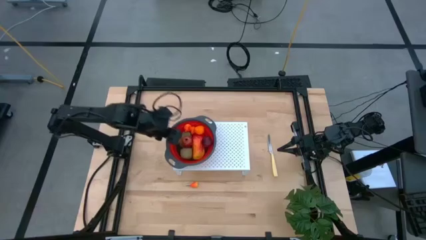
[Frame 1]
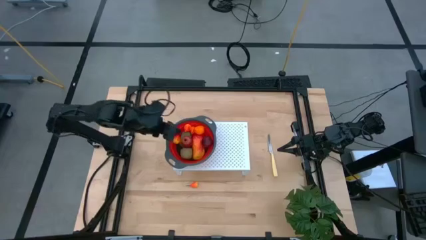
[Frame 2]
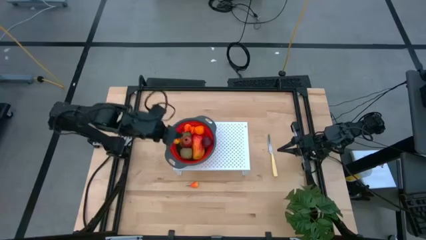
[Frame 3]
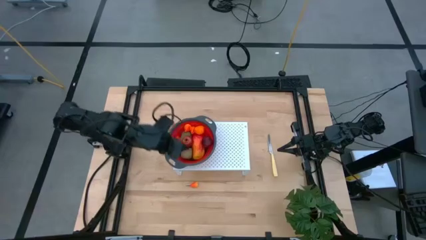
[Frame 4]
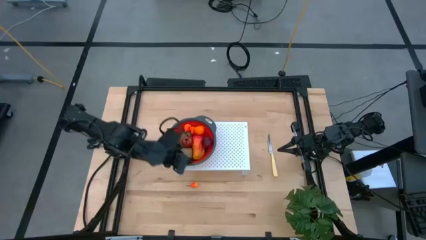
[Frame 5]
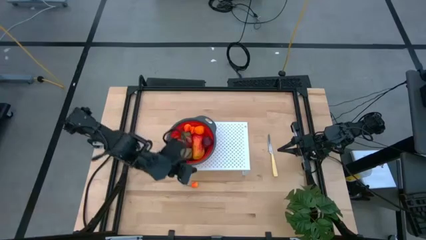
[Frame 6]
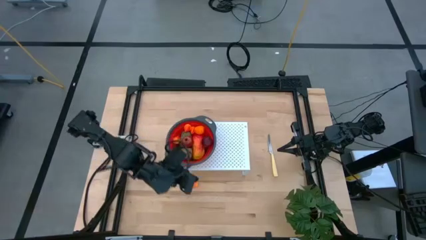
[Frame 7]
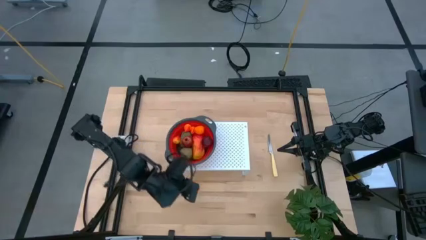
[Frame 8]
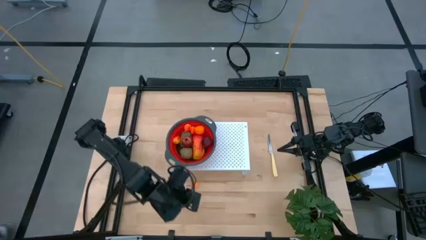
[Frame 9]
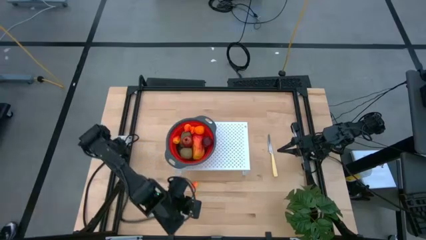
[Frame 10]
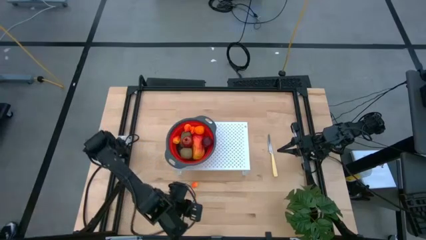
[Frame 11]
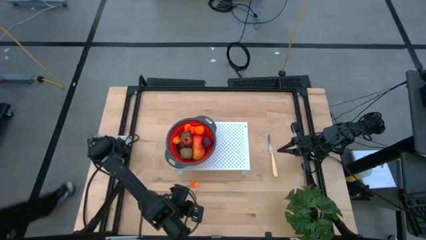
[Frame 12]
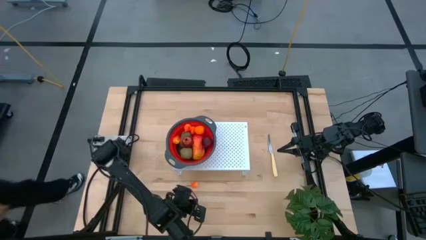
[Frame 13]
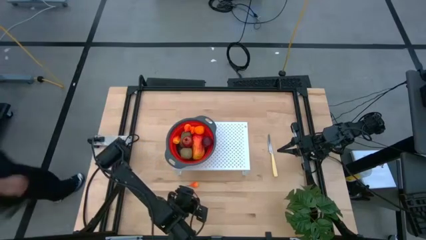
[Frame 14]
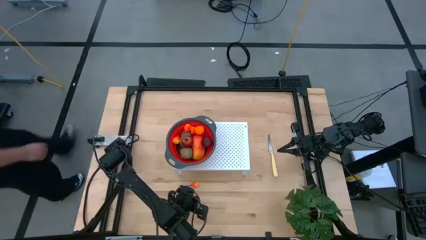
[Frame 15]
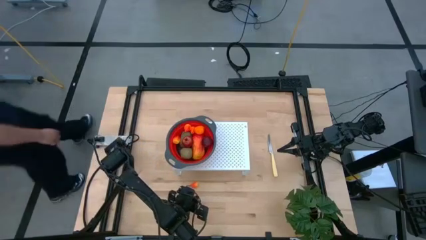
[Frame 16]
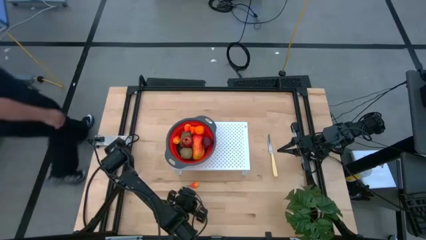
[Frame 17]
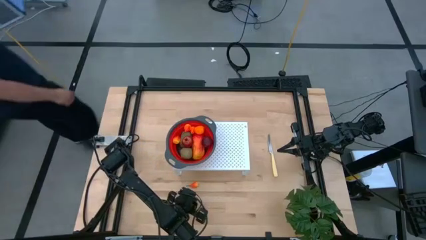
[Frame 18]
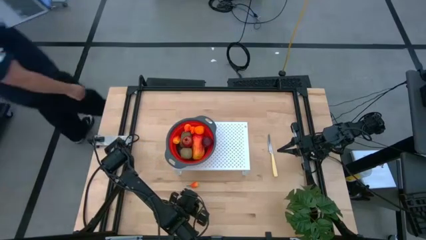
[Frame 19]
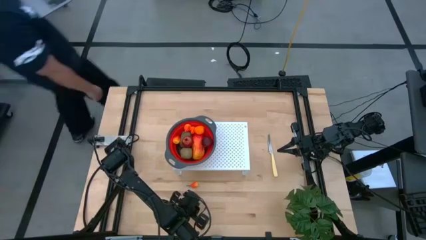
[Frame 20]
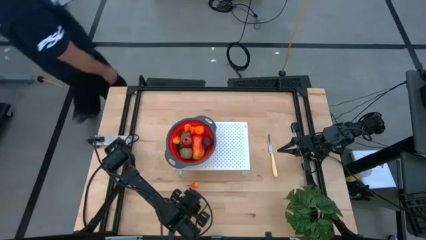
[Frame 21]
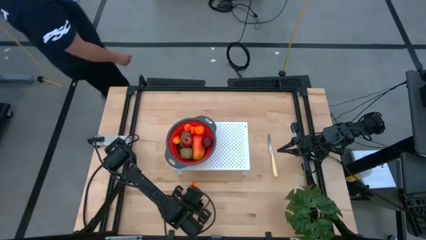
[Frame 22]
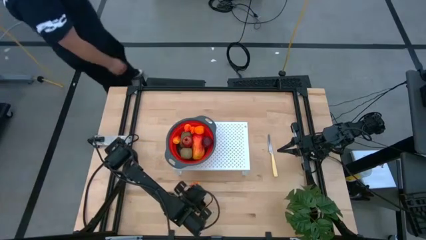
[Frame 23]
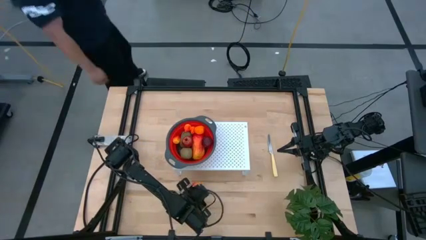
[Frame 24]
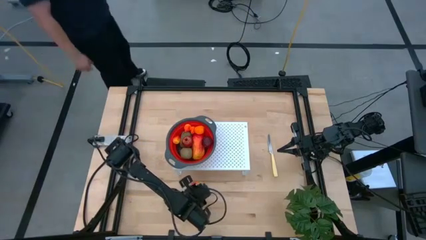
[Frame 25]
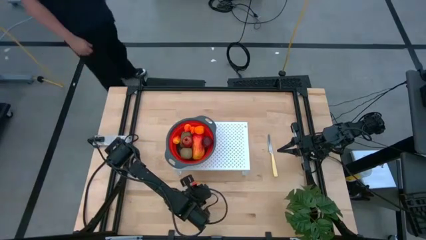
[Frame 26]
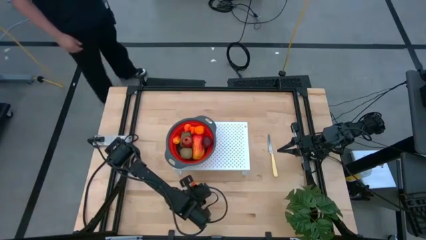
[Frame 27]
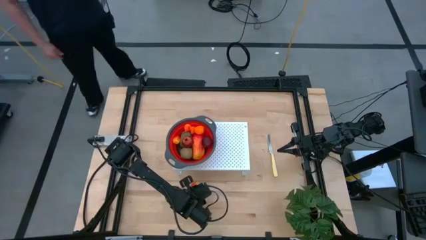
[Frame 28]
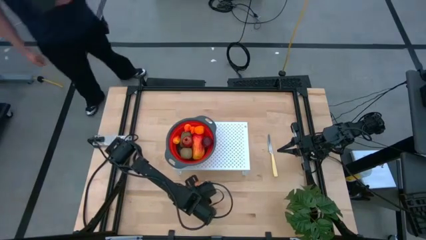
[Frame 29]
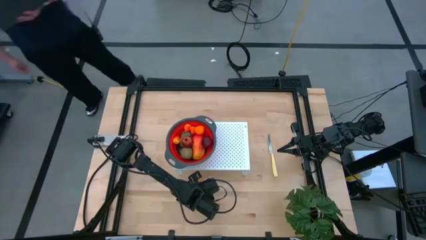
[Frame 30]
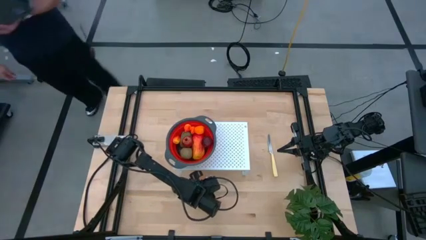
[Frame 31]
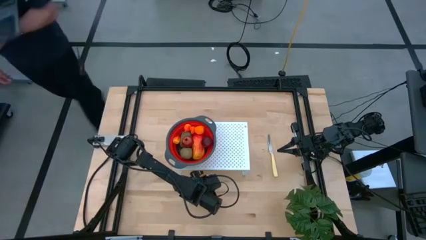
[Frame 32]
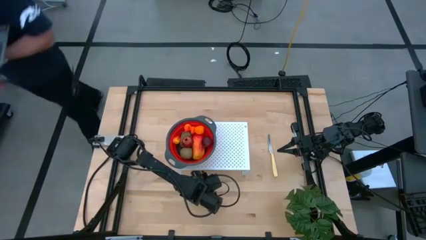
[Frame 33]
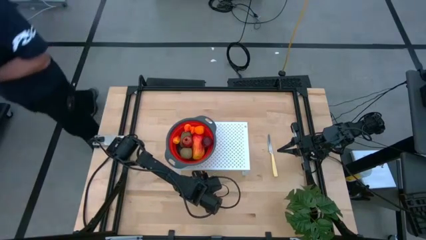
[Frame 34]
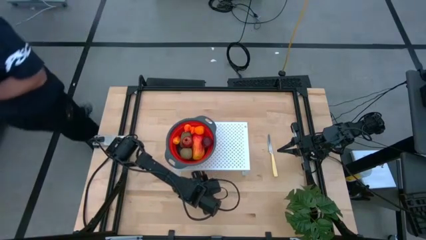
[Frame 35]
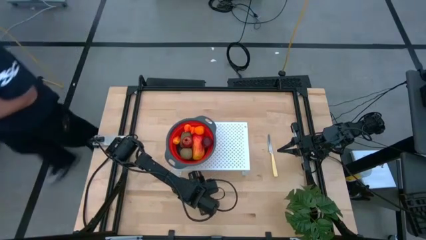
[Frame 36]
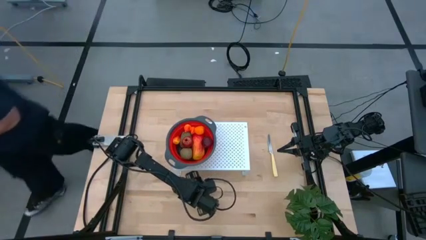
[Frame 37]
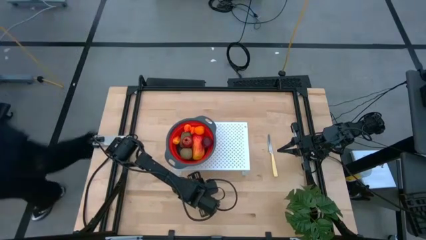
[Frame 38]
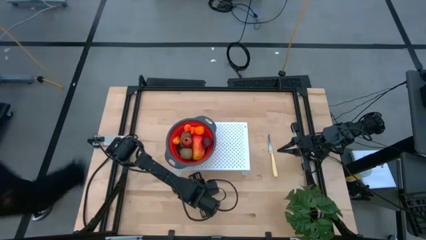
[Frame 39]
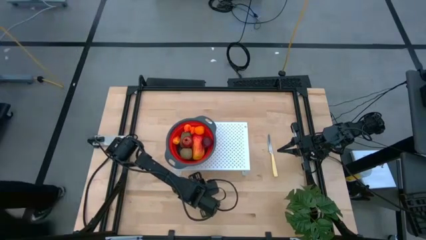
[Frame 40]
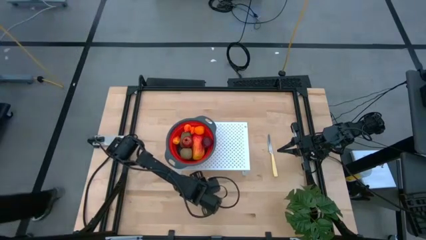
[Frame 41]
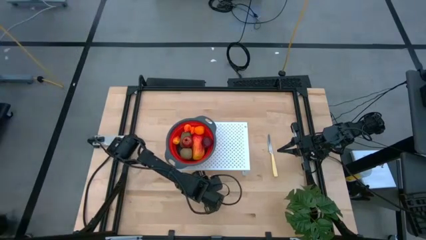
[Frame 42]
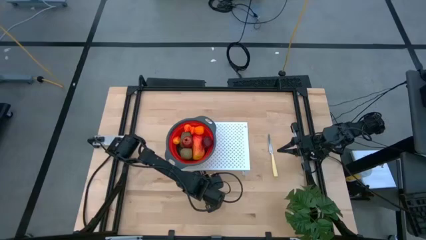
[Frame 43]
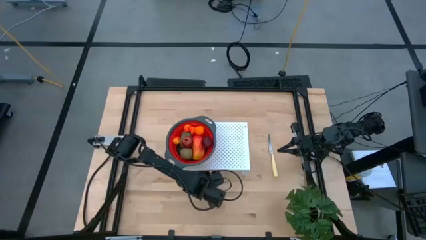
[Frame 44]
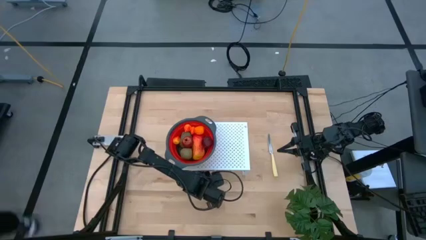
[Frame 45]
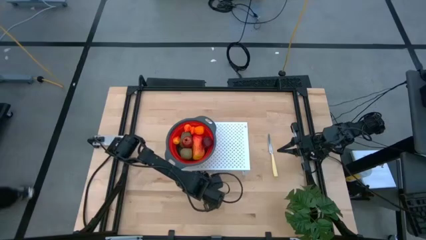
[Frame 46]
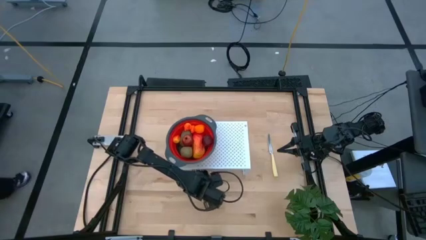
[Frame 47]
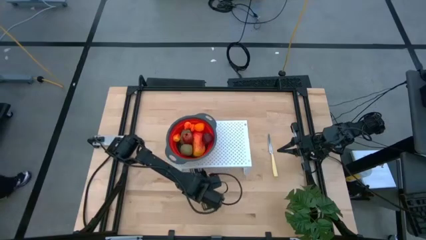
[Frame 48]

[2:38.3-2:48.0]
Task: Pick & Place Fruit
Put the orange pear into the red strainer bowl on the shelf

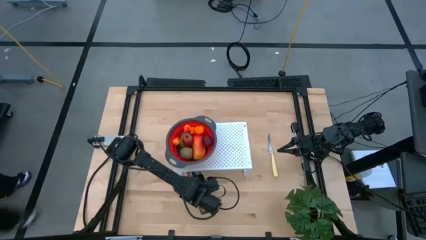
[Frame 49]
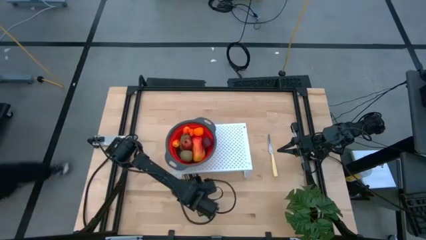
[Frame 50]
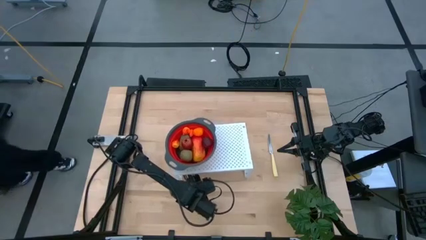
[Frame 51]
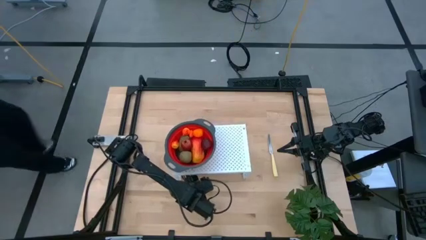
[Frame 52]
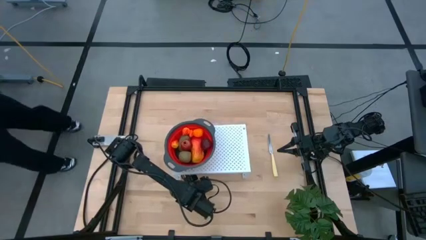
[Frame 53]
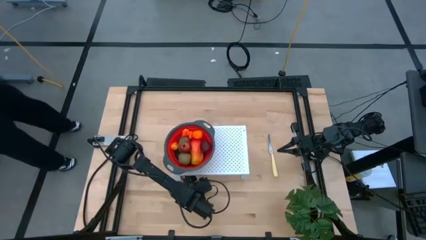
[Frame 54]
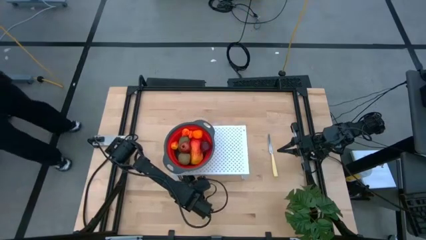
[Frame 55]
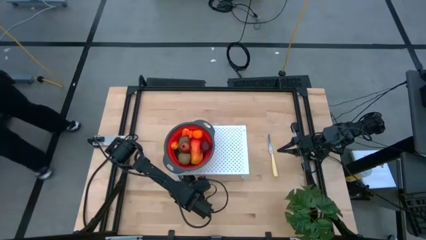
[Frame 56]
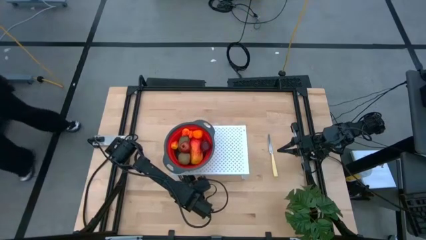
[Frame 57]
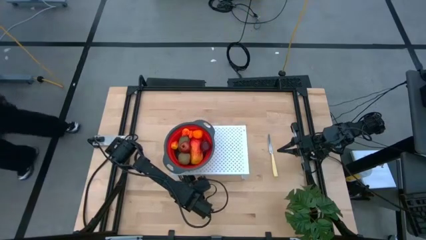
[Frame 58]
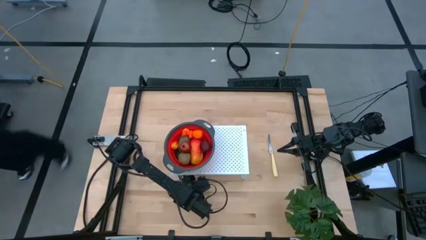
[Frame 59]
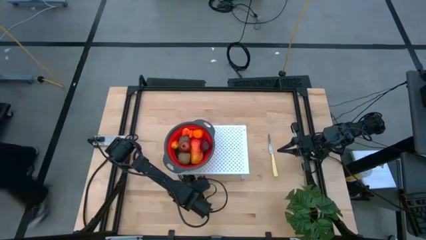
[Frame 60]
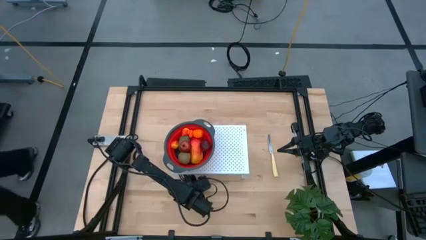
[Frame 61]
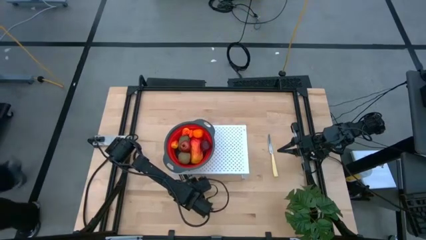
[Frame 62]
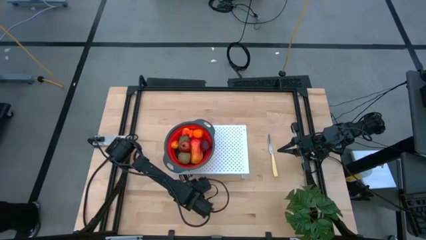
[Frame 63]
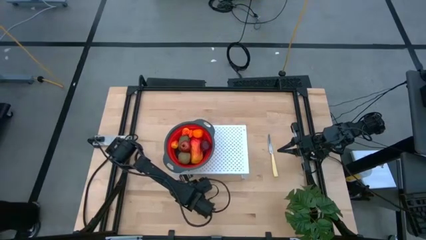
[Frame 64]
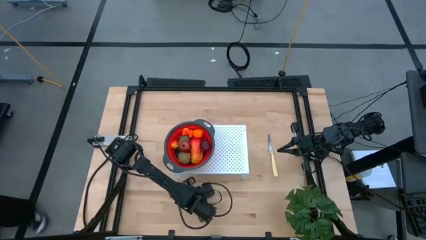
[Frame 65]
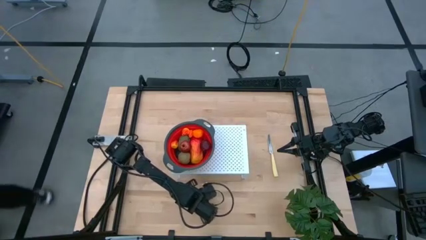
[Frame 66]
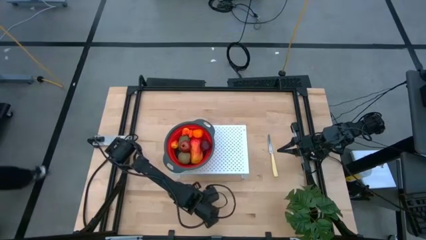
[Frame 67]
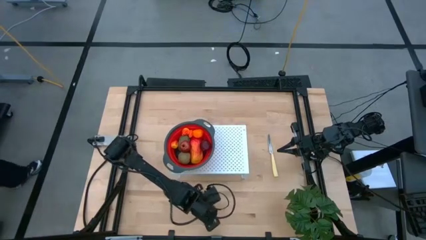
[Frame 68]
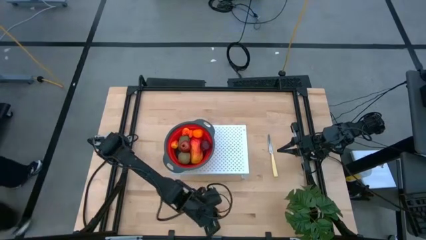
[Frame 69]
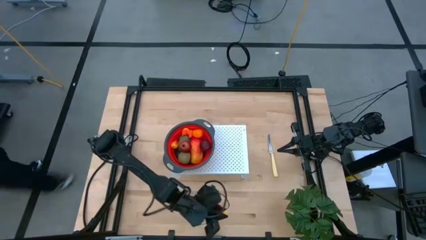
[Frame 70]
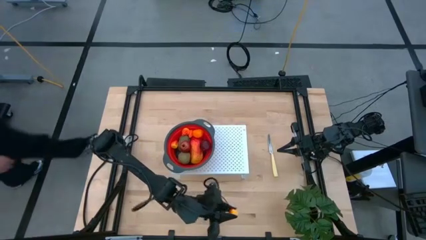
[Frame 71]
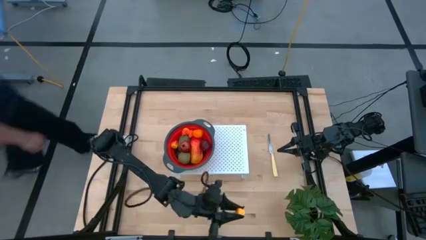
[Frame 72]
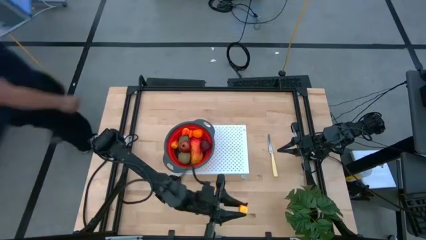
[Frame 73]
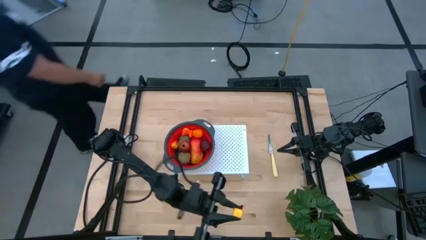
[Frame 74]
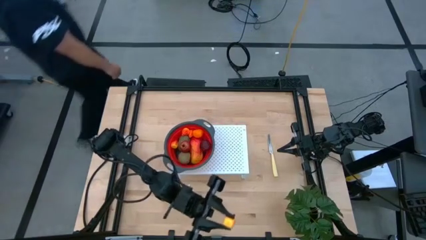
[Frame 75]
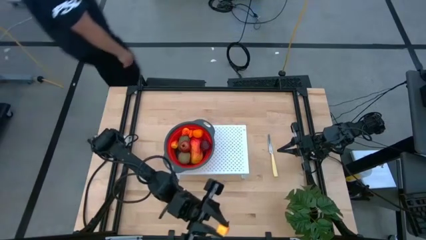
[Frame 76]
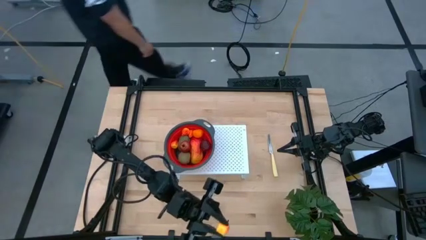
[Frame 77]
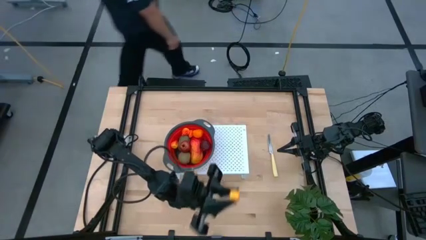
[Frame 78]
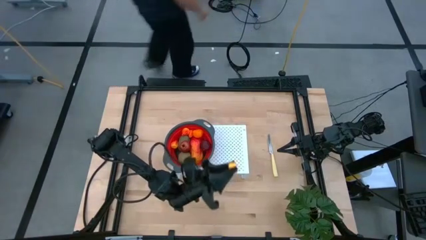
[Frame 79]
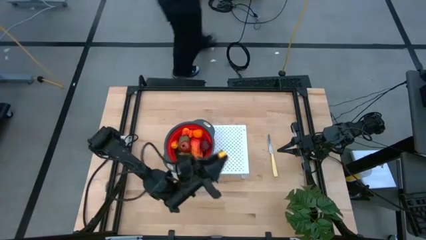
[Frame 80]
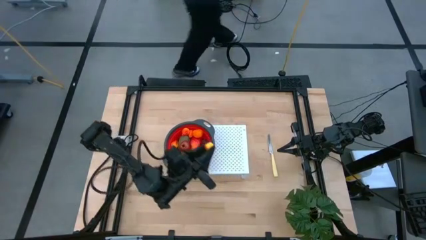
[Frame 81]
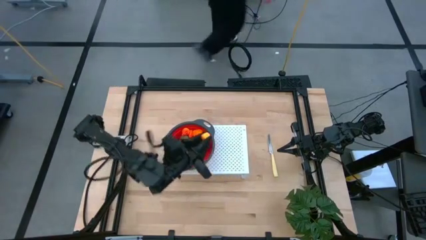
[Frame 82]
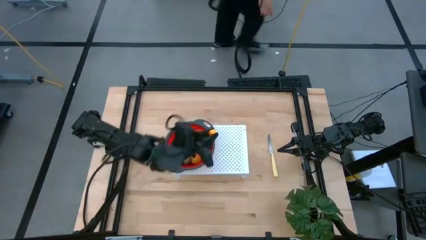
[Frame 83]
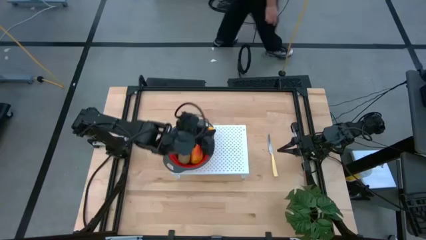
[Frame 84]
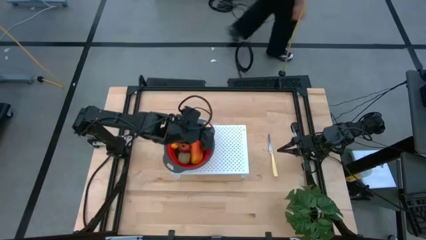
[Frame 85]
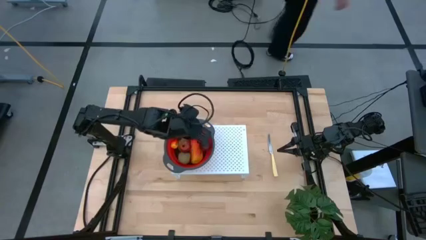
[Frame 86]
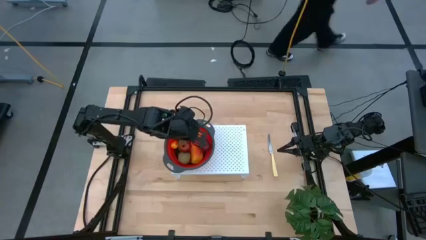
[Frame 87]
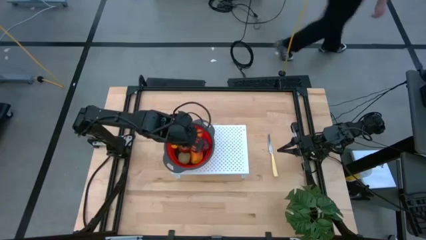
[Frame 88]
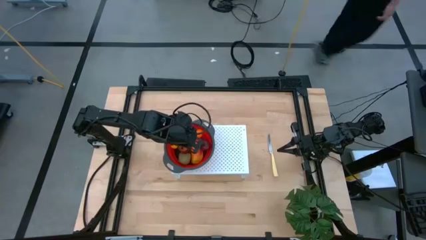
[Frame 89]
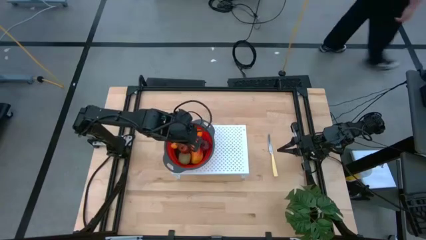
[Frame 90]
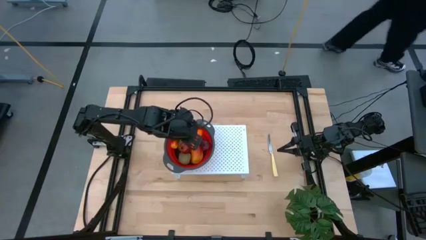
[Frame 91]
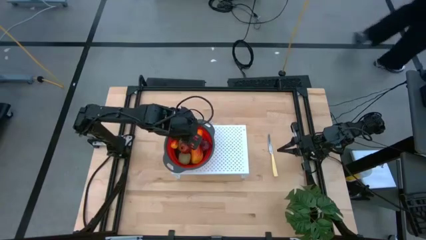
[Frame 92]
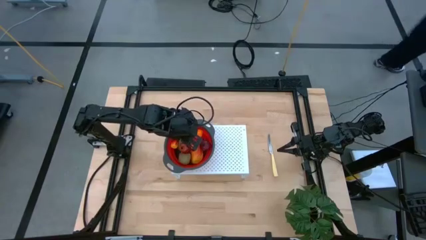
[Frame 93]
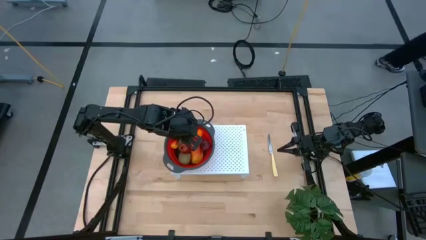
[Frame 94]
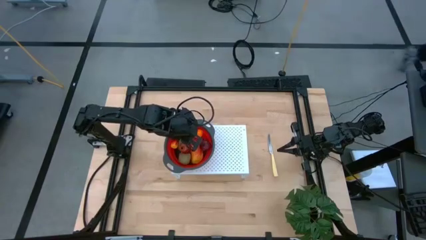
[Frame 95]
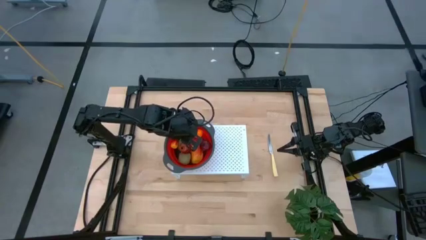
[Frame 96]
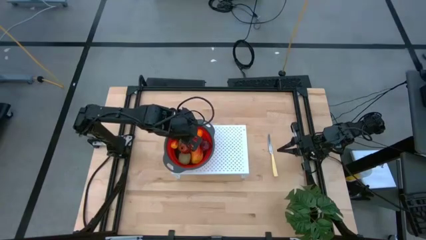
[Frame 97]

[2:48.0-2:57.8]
Put the orange pear into the red strainer bowl on the shelf
